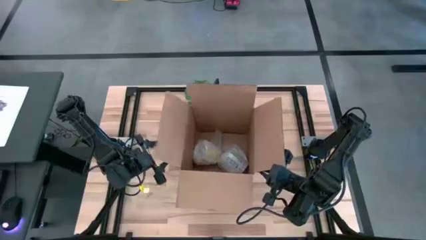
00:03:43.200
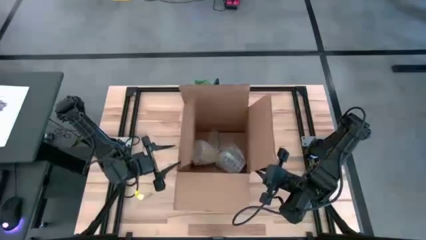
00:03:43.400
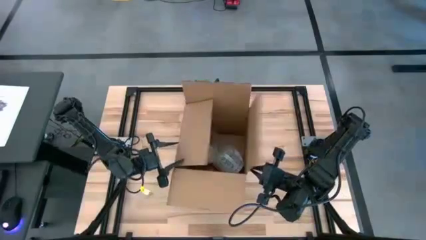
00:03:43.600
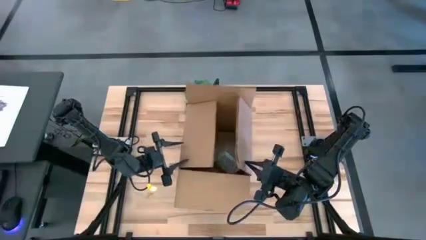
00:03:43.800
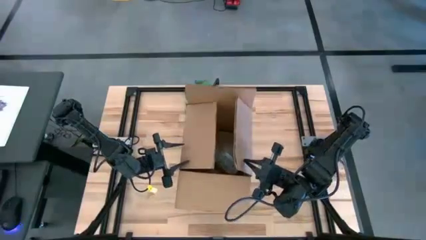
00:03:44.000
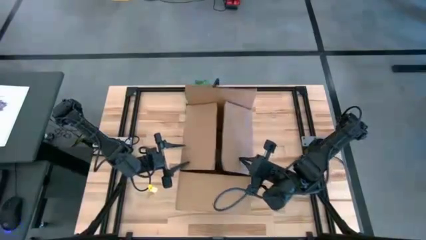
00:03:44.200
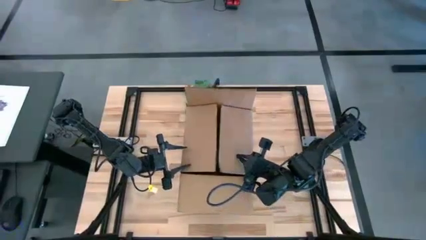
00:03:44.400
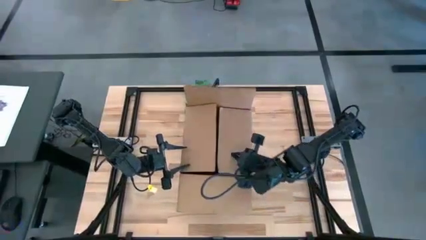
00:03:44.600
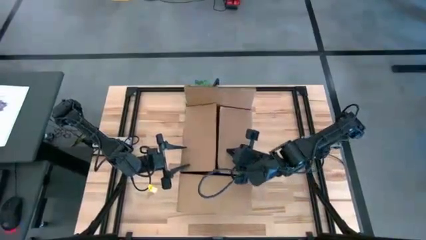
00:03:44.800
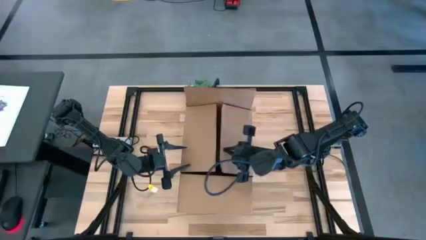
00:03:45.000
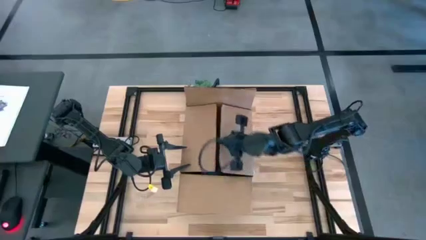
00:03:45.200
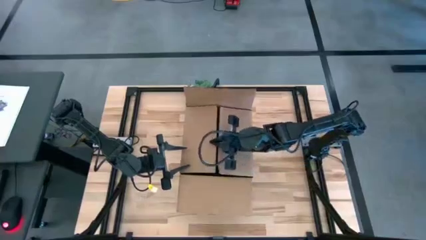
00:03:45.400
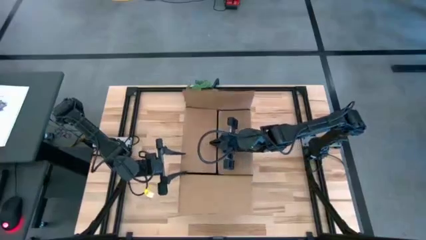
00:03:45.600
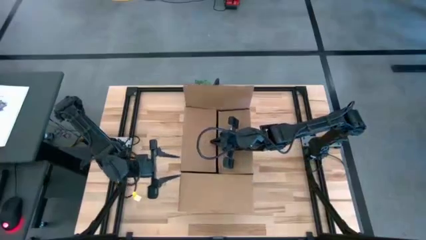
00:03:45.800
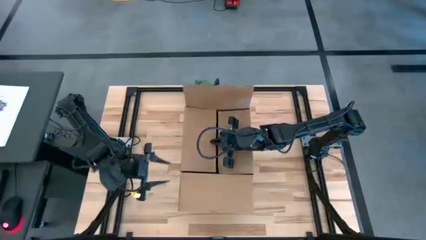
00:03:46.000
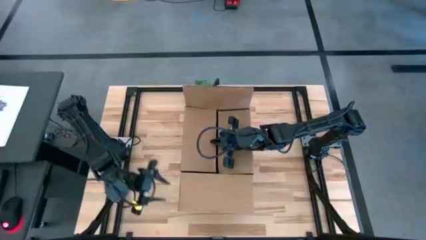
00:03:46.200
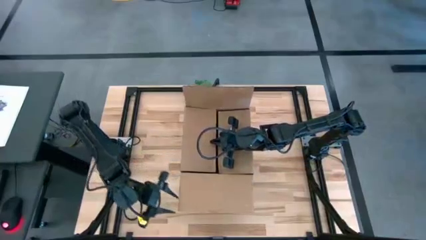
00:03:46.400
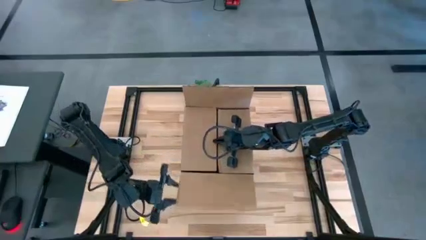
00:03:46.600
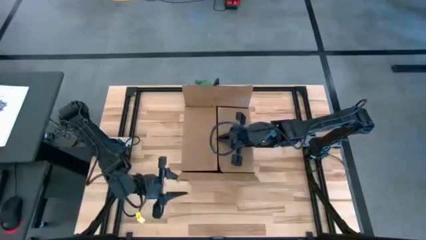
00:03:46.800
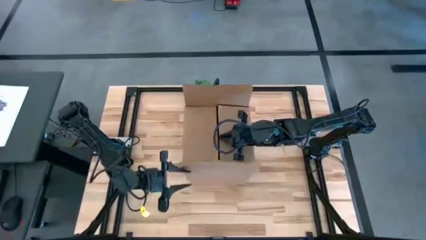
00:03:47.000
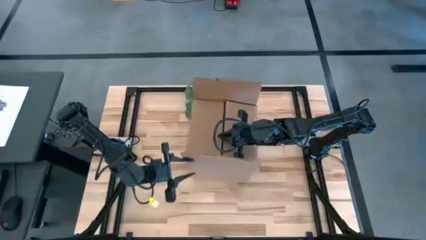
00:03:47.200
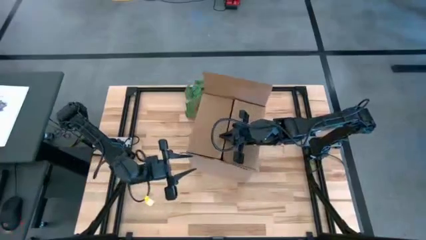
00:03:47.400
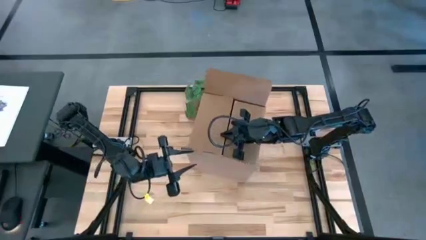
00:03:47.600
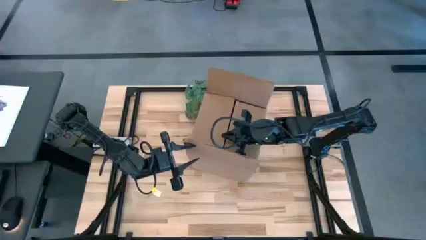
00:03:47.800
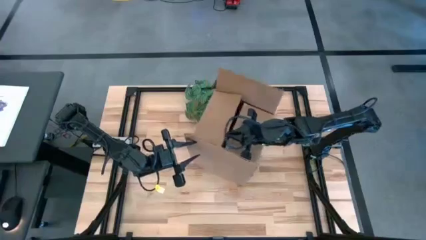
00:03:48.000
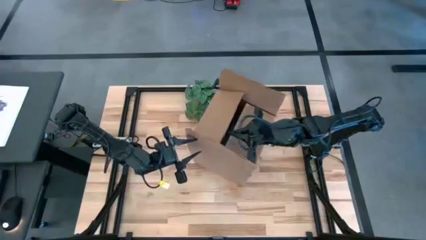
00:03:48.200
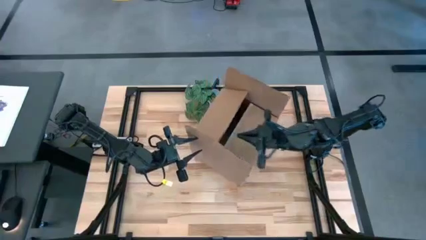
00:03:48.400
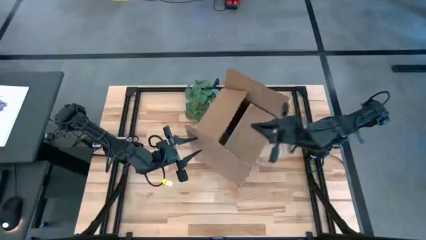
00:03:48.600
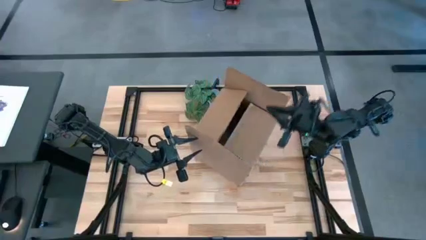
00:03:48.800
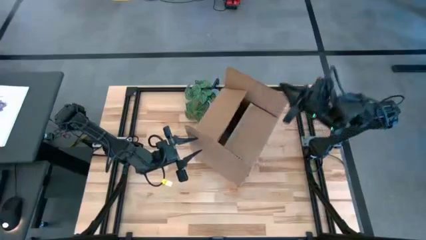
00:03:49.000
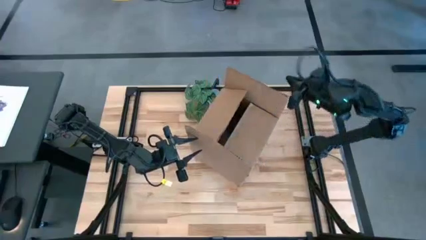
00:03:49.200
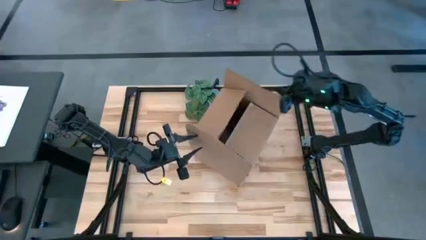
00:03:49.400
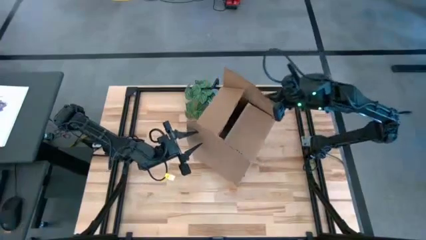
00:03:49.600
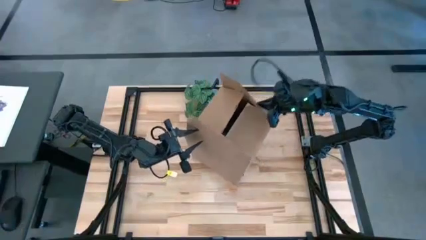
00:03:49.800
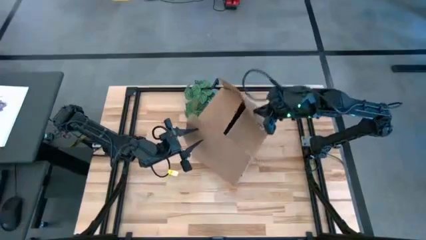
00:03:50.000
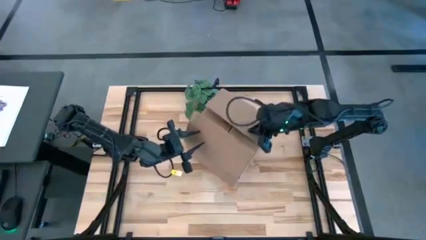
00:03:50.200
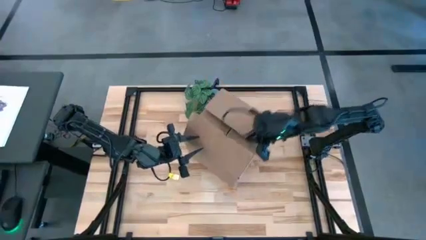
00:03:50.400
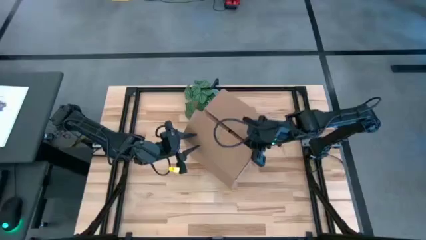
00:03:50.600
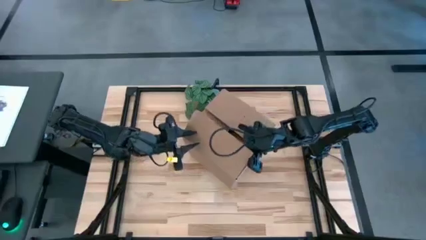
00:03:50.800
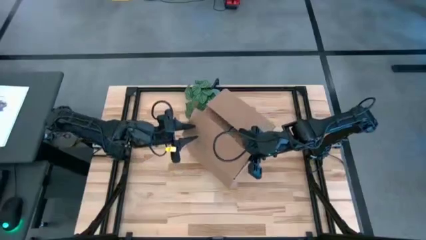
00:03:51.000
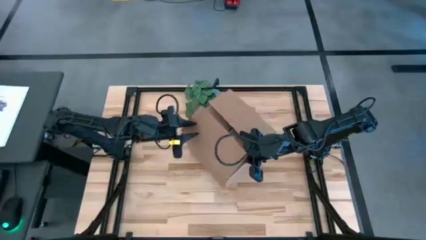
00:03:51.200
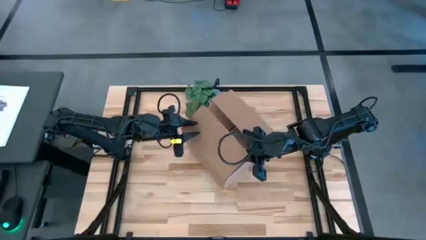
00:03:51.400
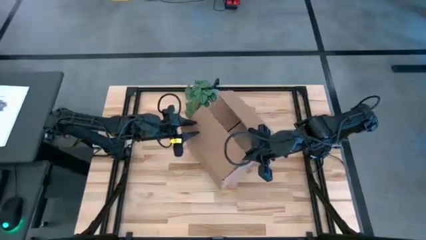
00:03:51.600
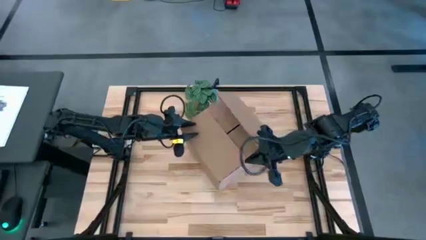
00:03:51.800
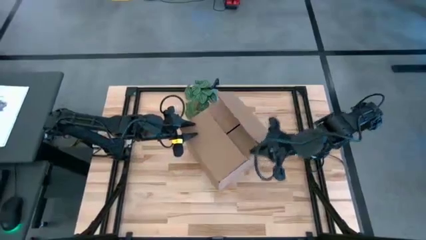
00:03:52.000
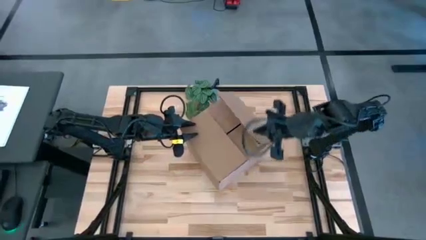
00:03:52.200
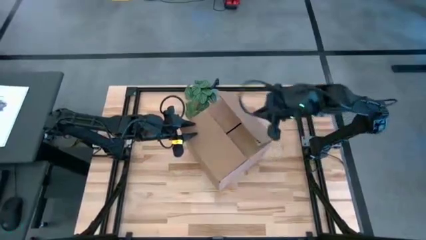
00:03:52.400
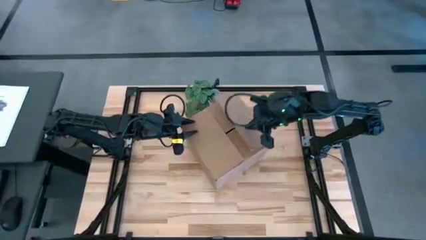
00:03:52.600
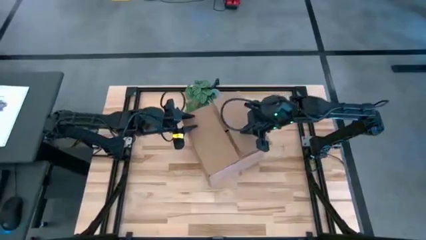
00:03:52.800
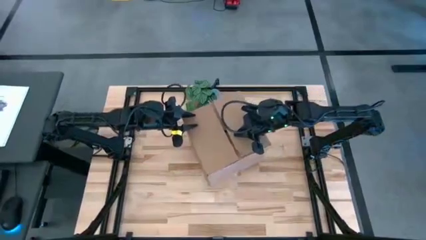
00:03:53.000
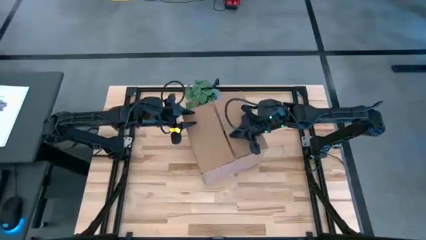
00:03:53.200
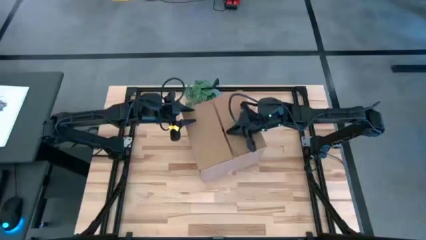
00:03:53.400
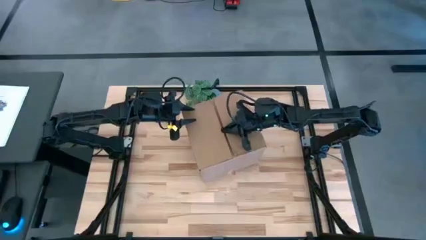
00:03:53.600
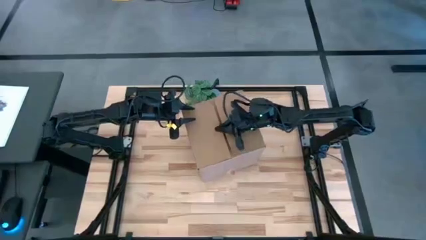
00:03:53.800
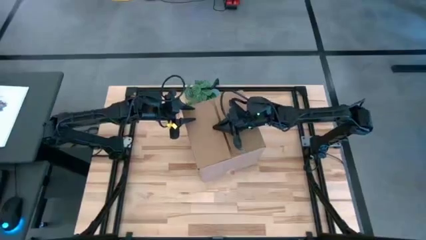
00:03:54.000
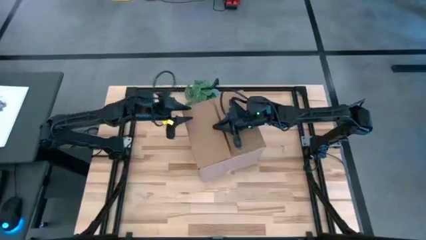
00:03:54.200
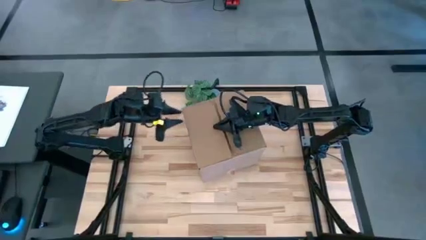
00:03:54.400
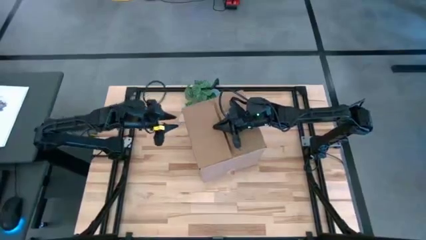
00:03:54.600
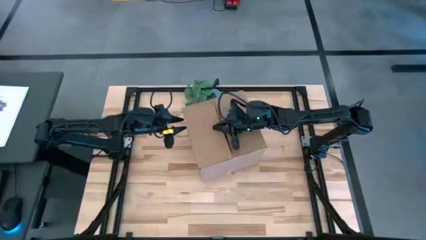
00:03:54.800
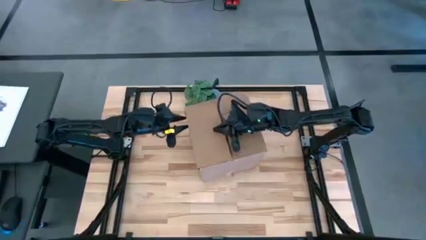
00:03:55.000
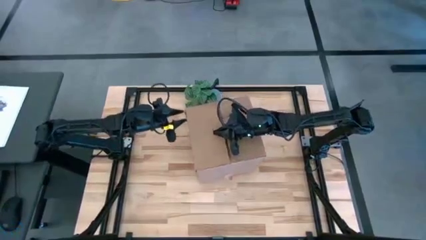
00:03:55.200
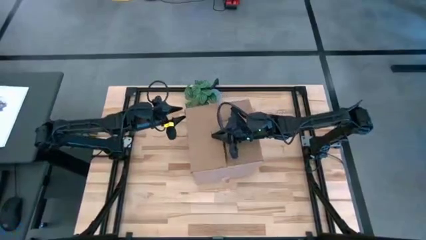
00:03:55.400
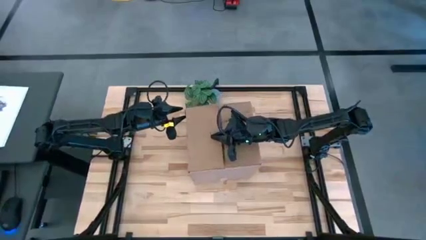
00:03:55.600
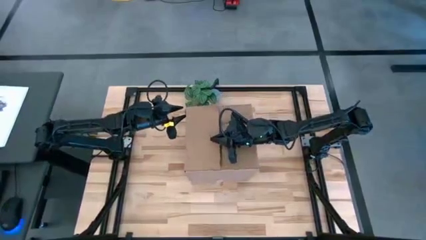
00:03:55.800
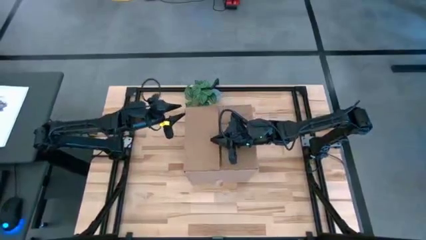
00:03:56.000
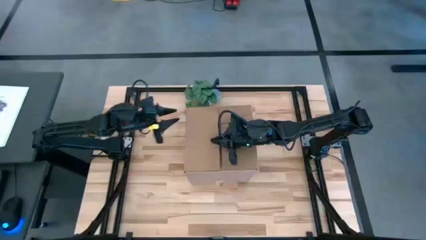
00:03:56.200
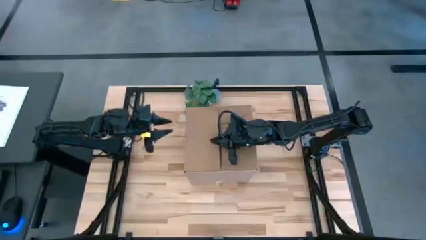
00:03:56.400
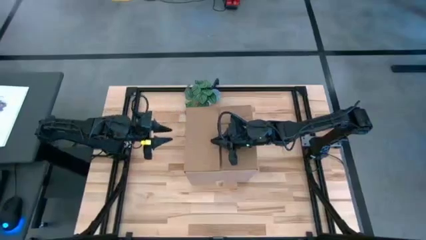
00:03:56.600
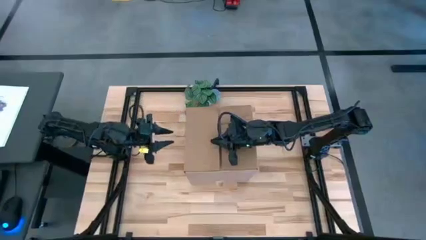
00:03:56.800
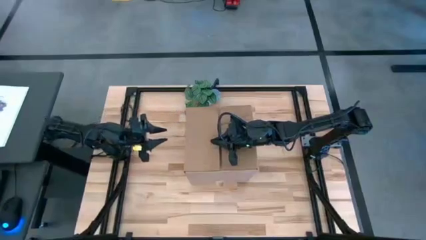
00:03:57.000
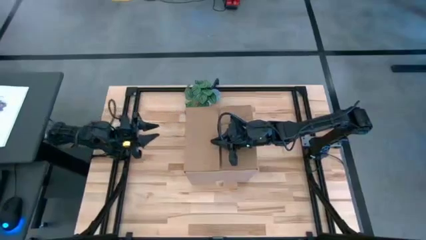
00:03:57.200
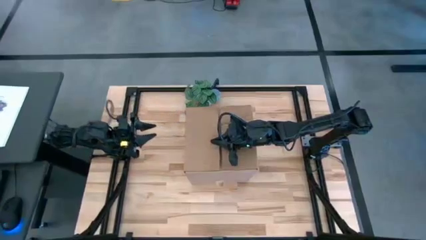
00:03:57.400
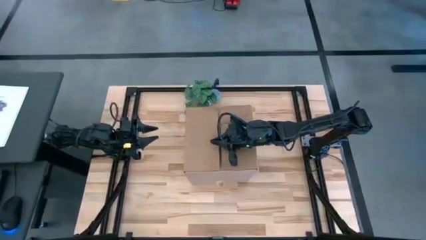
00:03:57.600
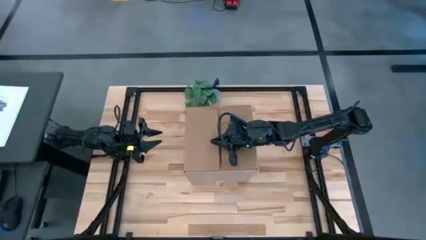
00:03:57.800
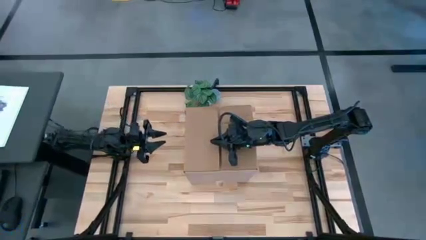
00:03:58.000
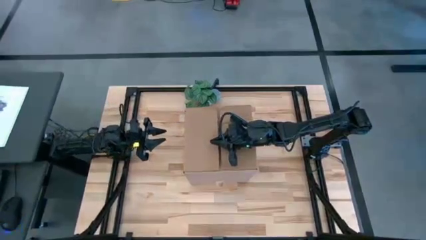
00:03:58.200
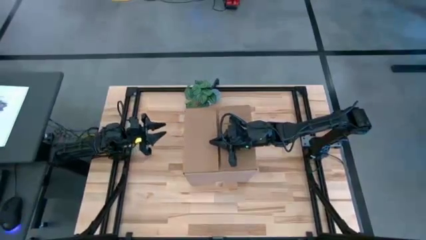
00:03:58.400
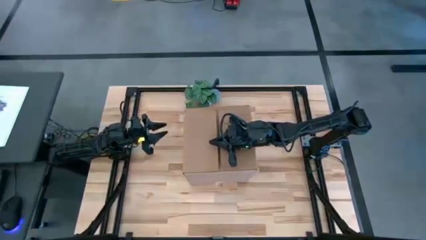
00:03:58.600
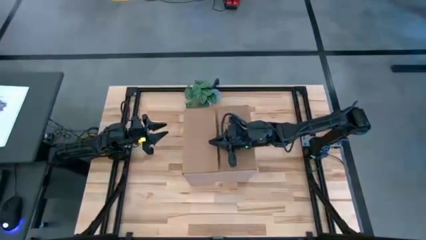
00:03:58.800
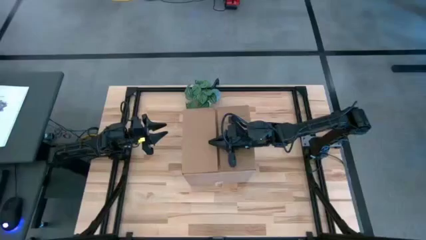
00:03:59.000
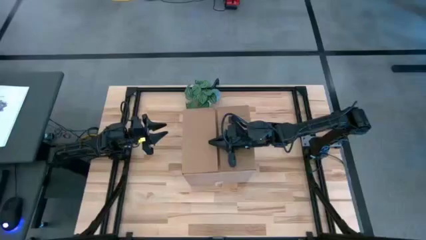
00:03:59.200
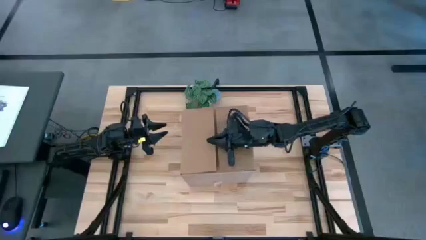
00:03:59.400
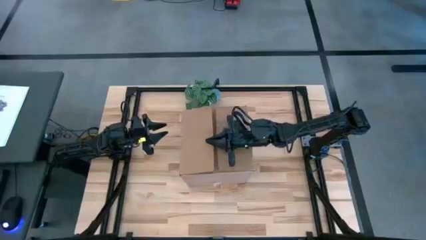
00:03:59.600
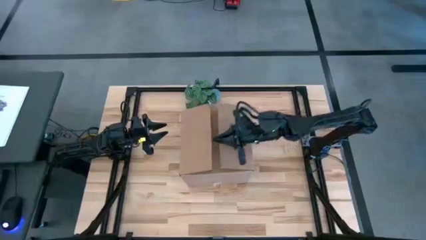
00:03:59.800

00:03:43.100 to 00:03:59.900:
Task: wrap mug
Close the box

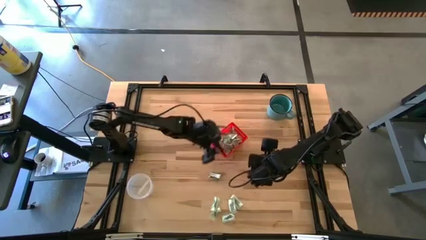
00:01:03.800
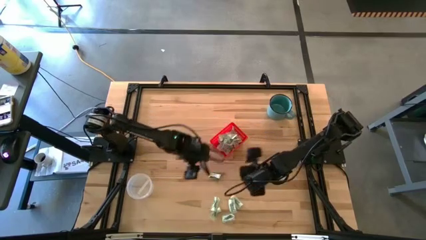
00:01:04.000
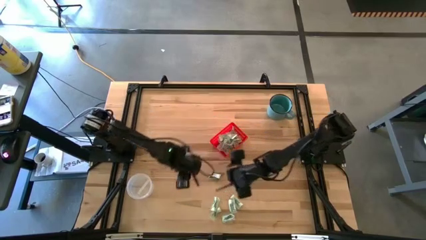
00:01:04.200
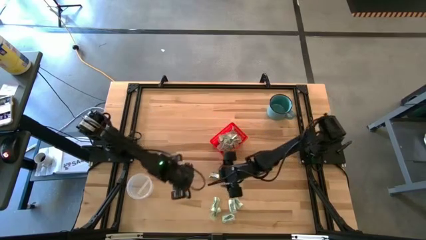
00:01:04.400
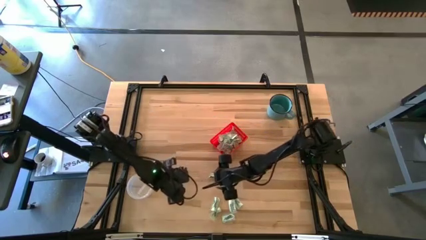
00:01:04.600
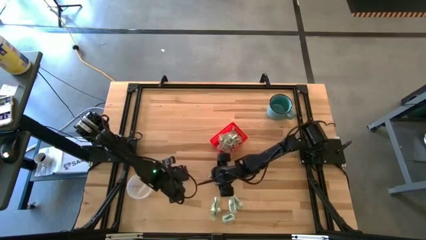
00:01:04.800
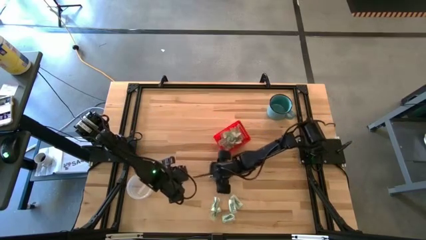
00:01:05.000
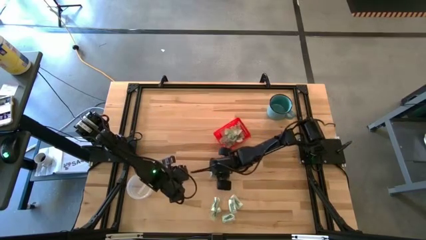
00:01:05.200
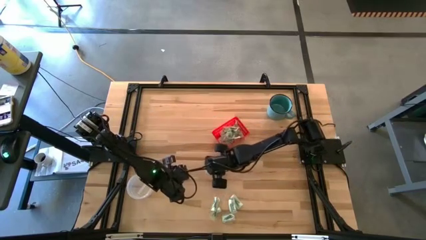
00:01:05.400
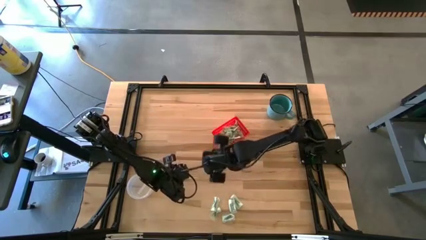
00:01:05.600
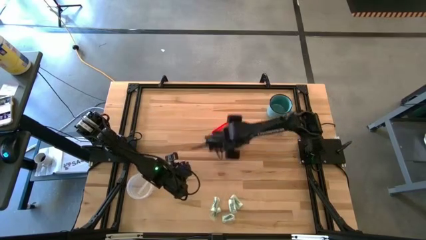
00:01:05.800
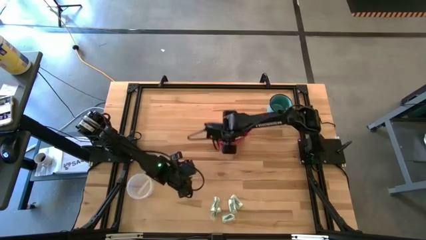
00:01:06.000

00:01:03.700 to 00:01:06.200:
Task: Pick and place items into bin
Put the truvia packet into the red bin
